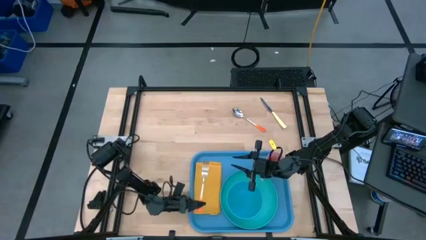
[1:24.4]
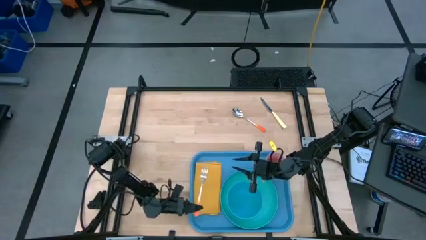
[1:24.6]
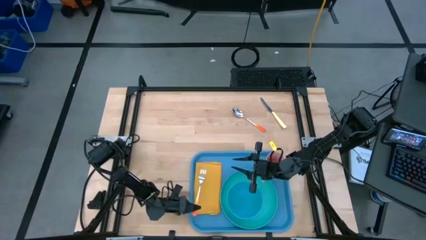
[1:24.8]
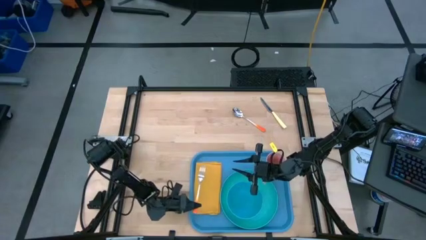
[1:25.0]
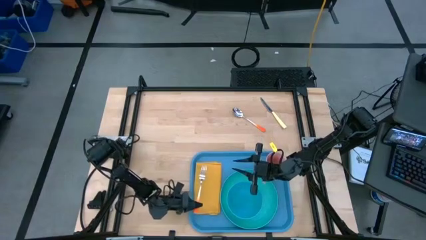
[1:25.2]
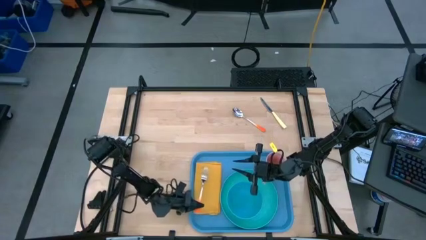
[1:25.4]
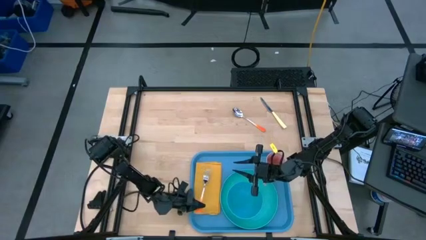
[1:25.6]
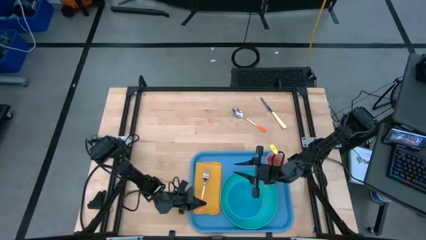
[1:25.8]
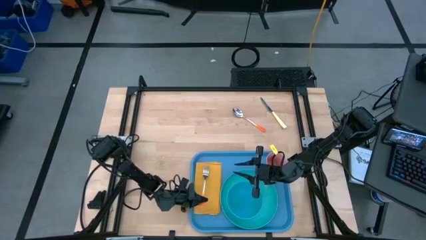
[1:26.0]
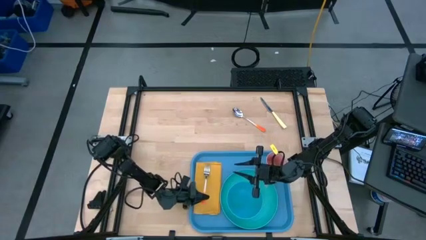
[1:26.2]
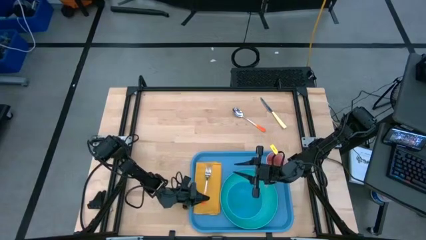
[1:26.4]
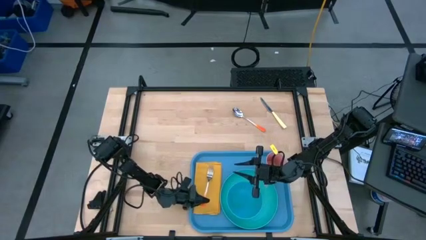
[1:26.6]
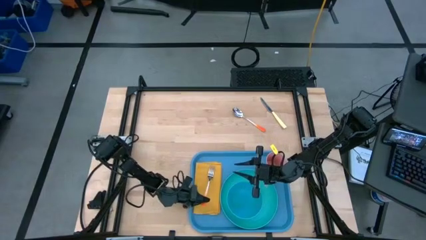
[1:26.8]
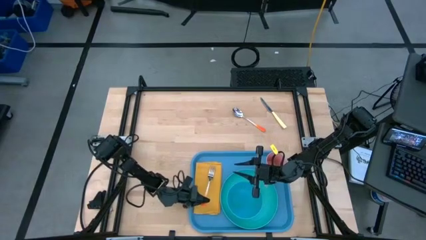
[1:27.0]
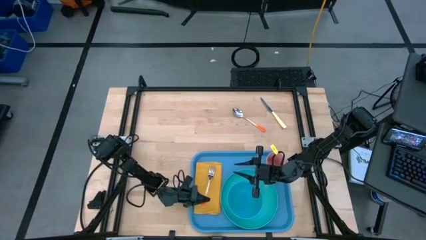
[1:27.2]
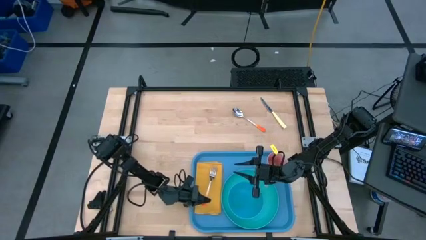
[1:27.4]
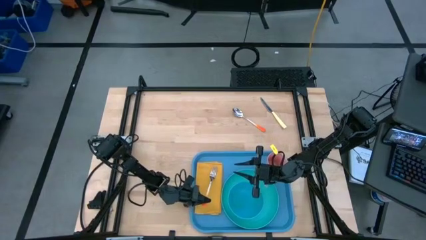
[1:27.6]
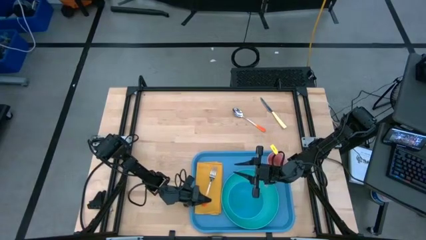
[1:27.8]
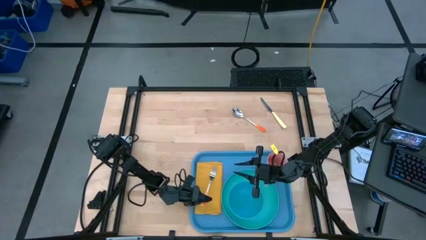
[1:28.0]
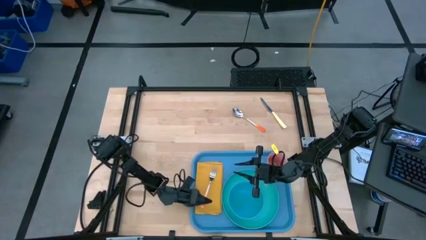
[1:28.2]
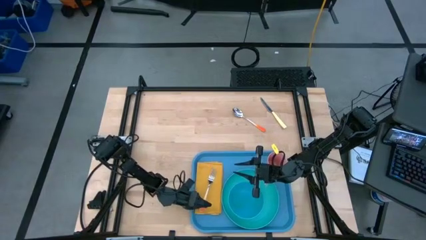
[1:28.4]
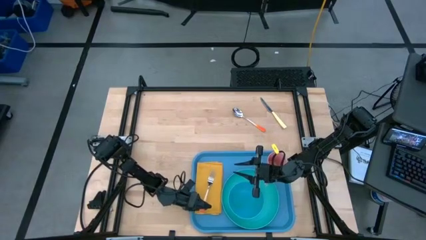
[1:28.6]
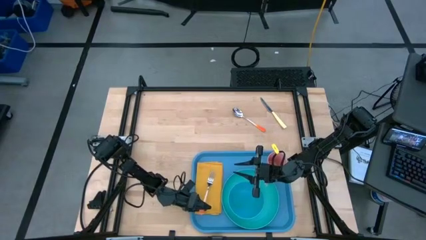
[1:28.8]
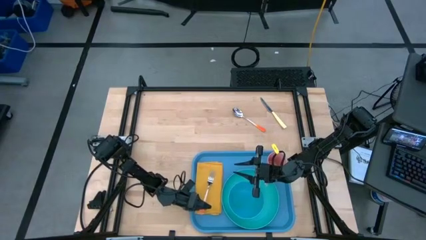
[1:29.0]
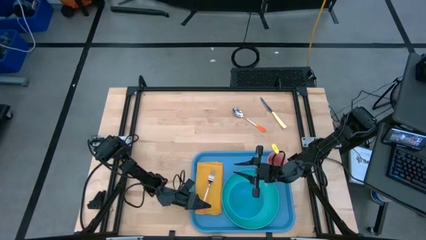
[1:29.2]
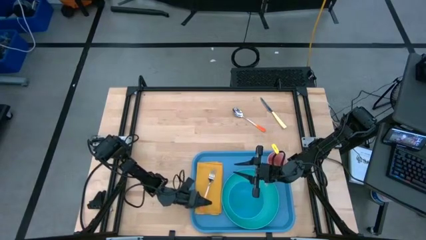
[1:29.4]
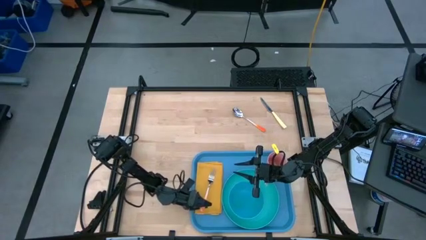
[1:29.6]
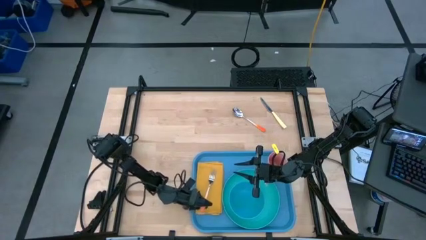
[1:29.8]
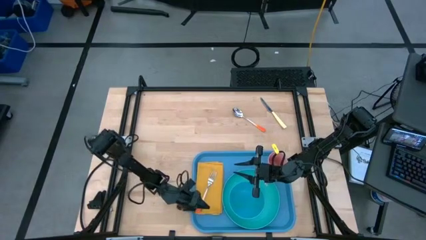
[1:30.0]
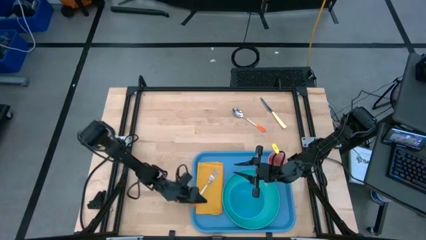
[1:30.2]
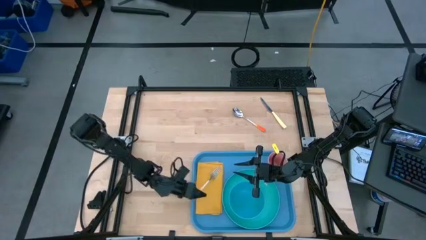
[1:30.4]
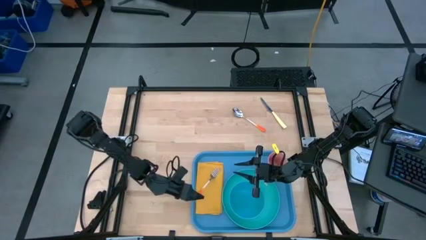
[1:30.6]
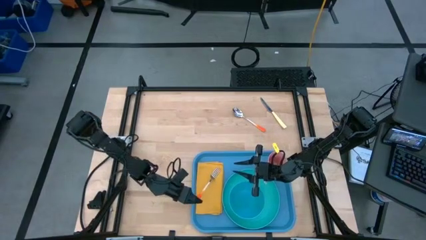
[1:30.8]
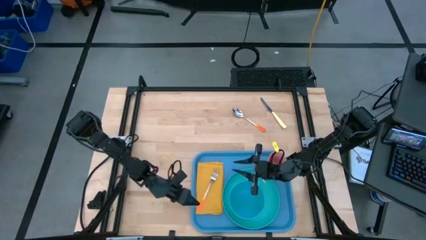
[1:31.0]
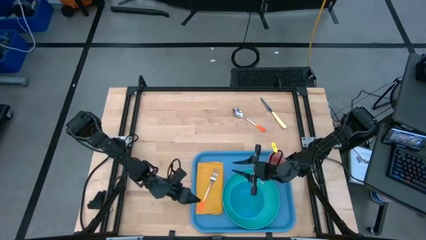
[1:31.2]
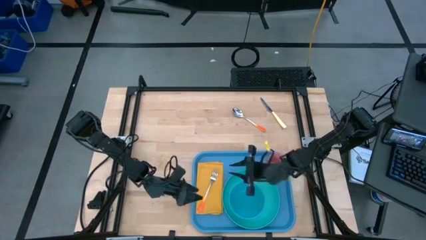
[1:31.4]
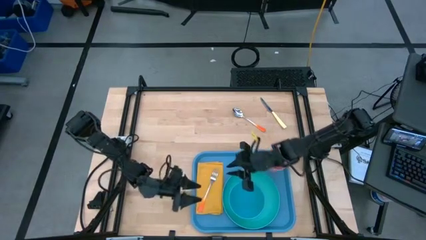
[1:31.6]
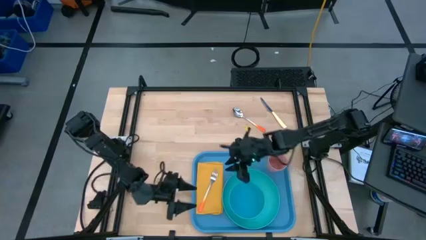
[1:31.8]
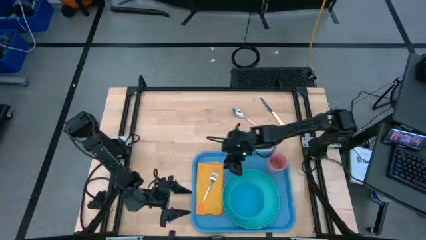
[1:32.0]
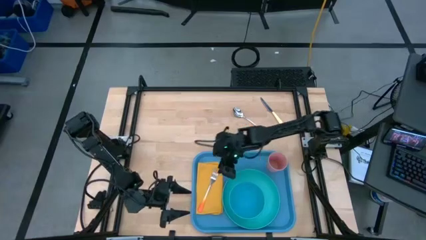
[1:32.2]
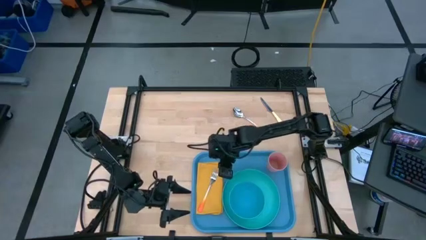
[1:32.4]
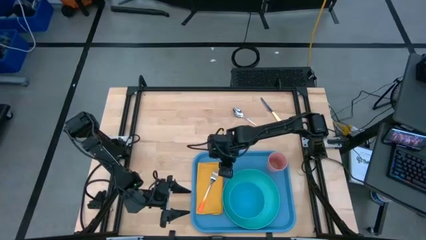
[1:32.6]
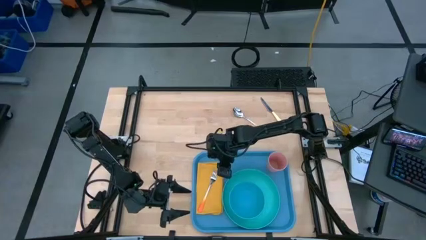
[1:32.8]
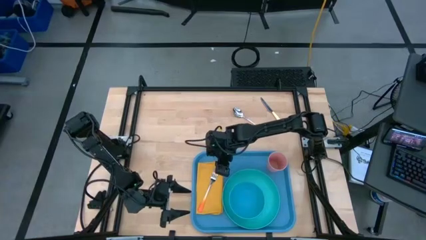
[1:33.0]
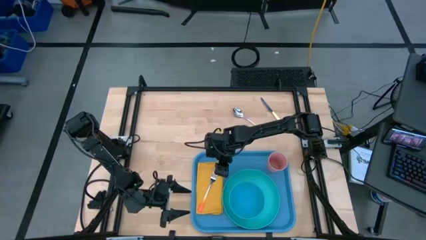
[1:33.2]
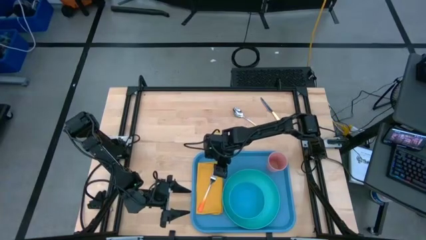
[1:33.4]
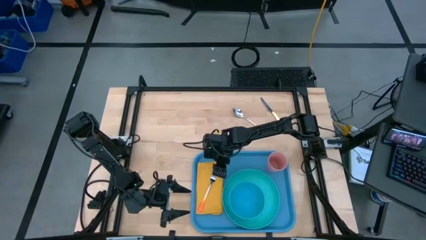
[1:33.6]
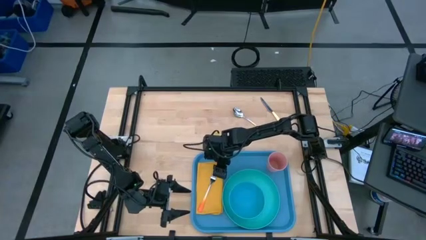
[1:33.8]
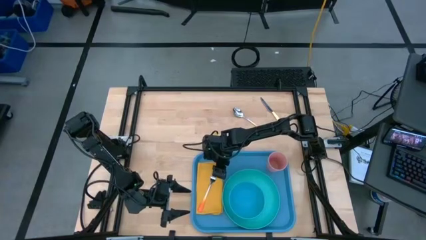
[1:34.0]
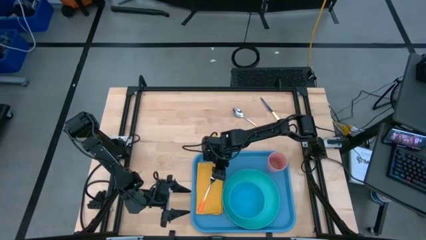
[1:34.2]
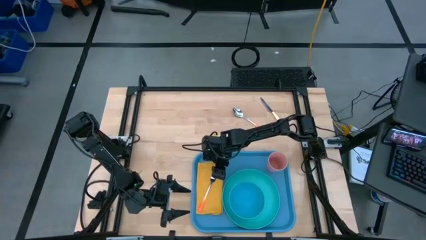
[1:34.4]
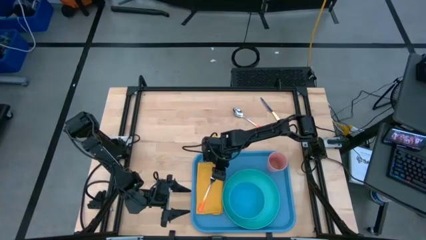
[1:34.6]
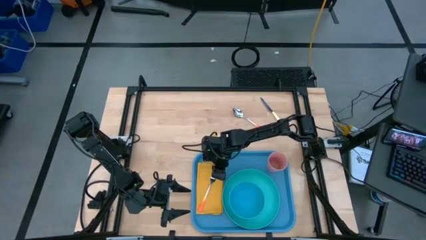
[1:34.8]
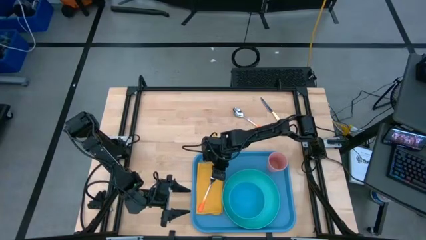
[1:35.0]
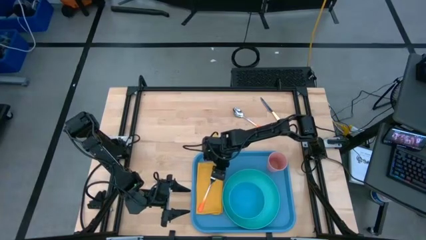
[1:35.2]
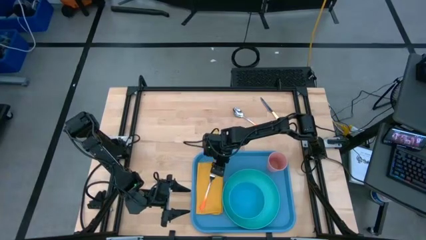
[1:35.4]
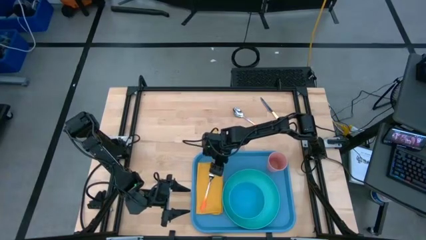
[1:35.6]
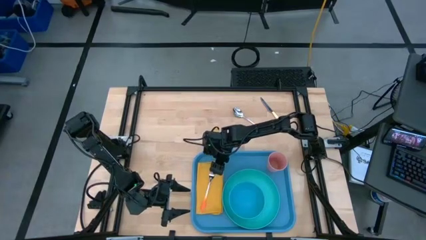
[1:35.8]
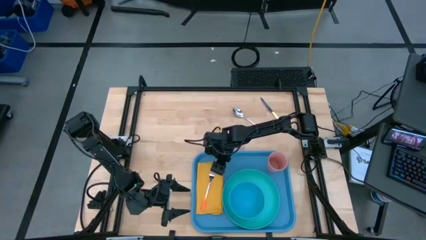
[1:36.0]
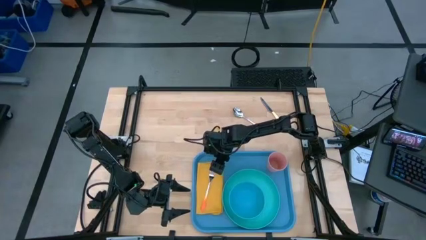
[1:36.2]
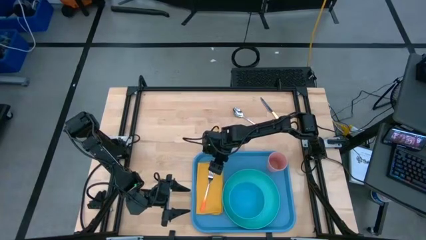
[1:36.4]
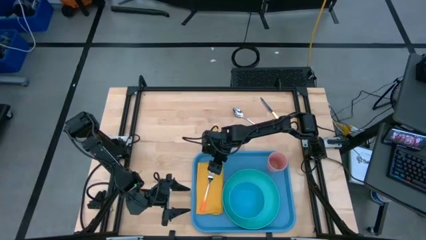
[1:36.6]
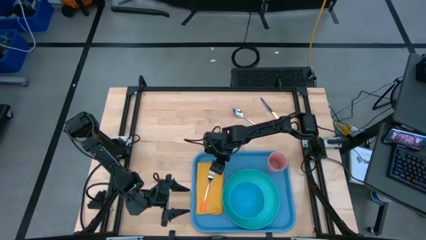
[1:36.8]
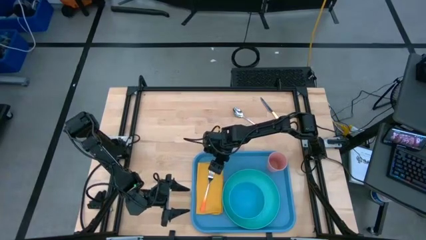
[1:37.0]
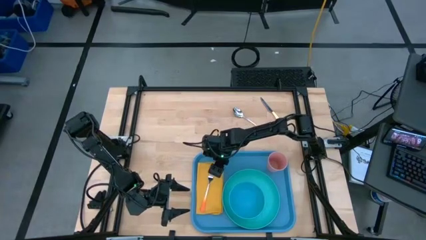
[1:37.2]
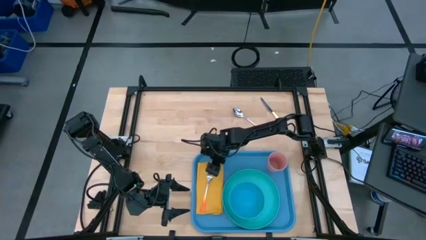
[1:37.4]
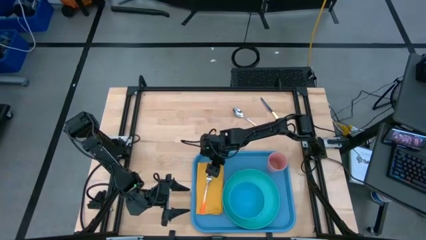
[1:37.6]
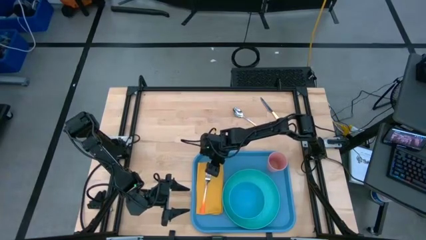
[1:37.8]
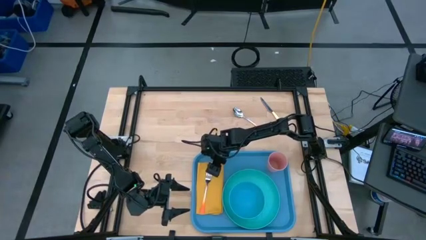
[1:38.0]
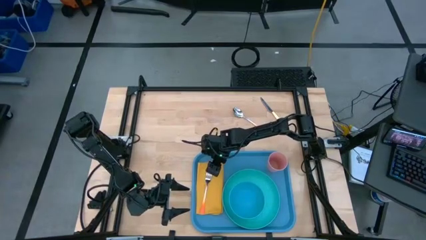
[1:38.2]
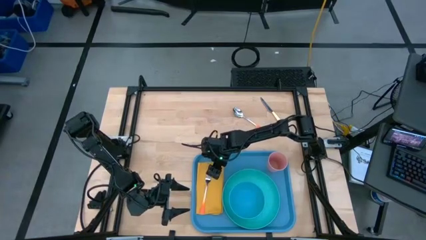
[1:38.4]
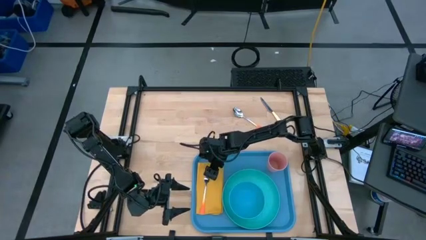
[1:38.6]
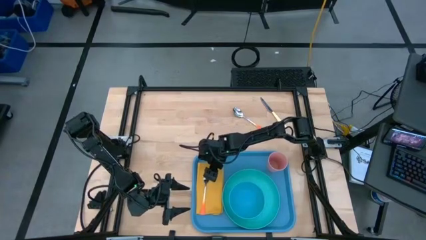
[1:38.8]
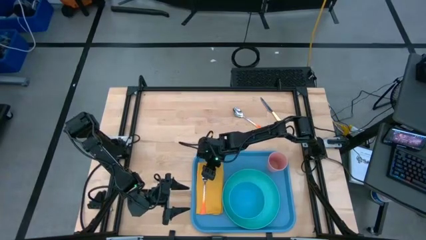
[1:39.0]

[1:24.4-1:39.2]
Task: Set up tray
Put the orange fork on the orange napkin

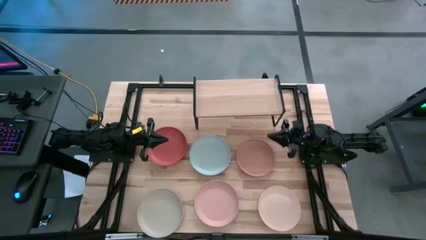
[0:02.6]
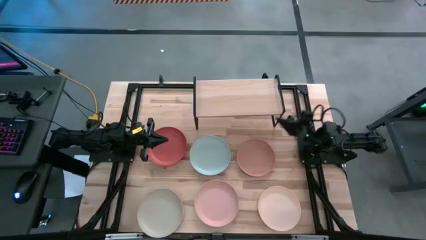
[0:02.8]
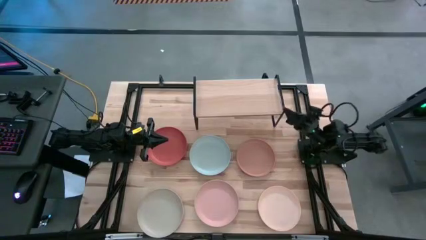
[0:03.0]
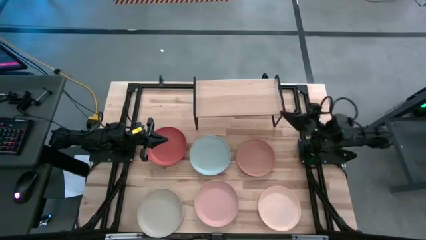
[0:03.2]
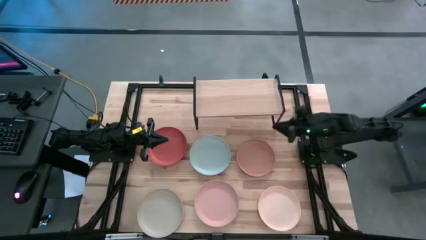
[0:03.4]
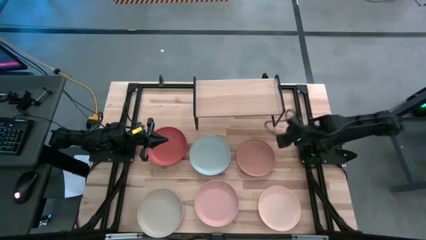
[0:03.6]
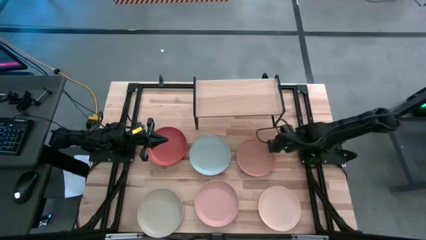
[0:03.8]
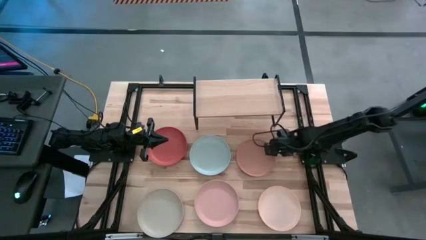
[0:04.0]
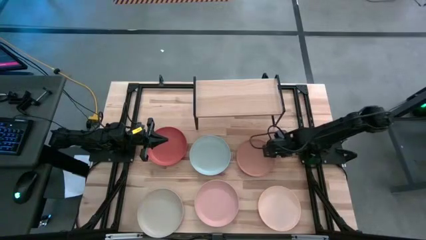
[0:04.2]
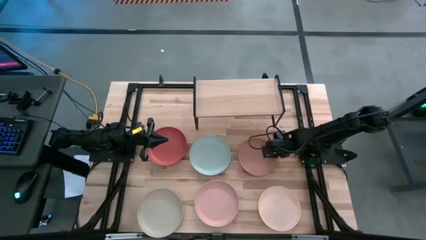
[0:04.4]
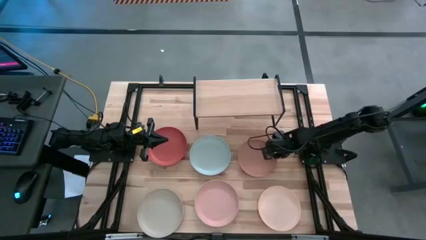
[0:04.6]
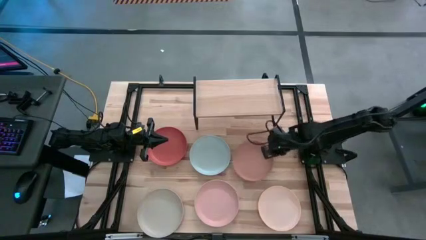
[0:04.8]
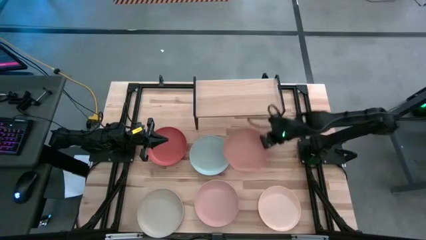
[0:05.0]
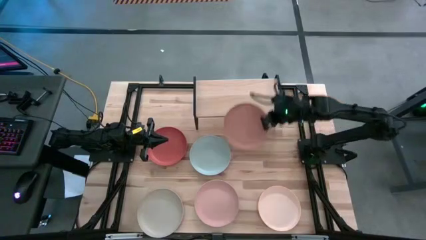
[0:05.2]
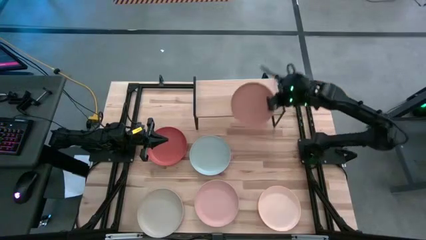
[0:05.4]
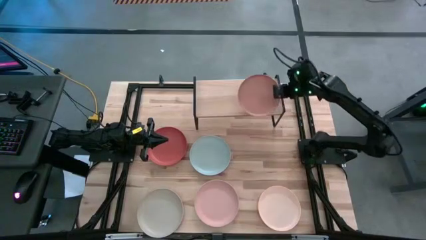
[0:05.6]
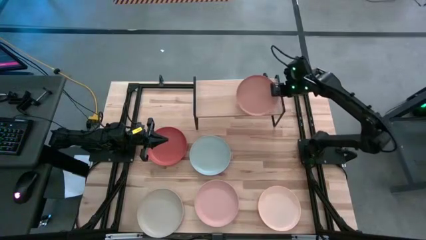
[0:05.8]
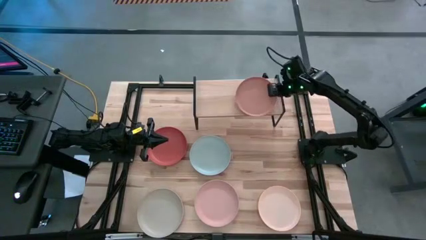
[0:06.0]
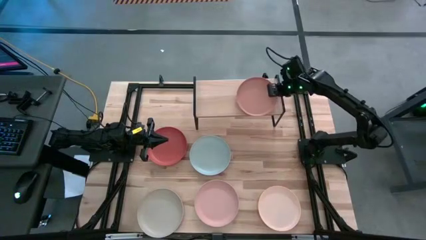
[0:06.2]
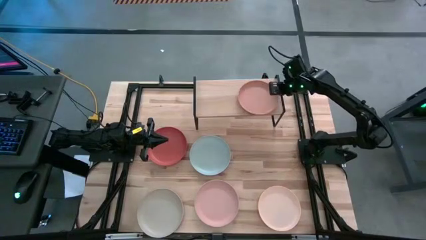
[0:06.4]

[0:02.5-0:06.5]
Task: Place and stack plates onto a shelf
Put the light orange plate on the shelf
